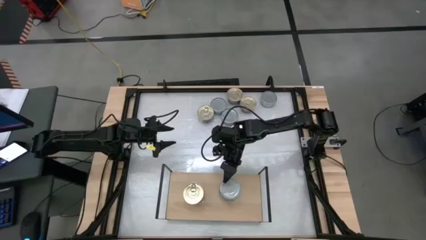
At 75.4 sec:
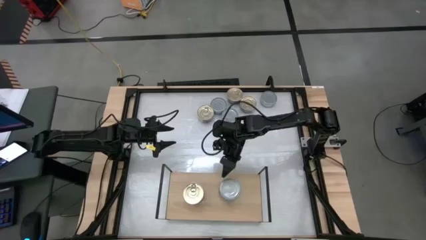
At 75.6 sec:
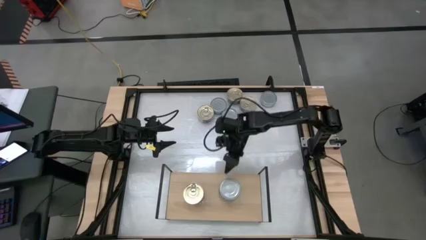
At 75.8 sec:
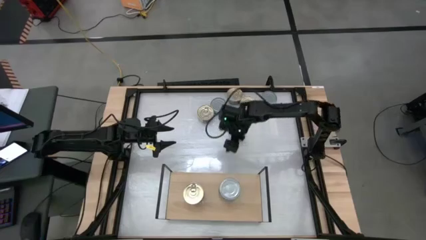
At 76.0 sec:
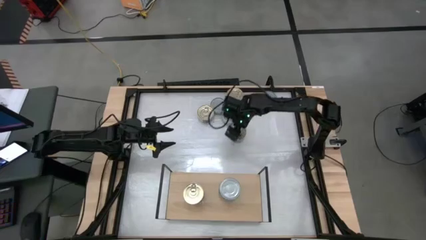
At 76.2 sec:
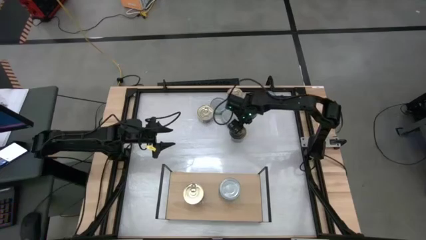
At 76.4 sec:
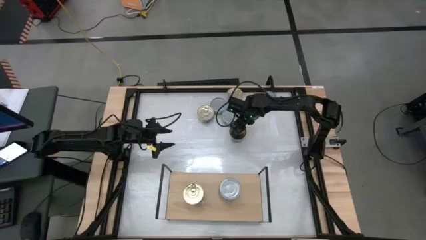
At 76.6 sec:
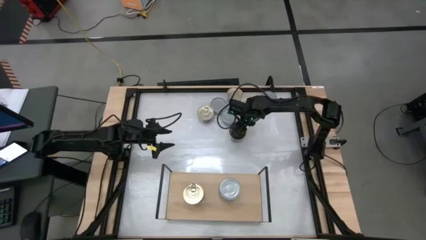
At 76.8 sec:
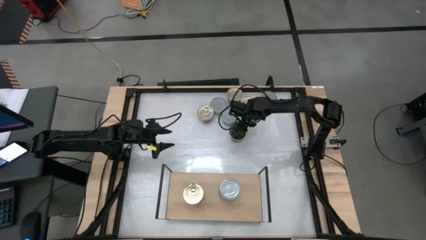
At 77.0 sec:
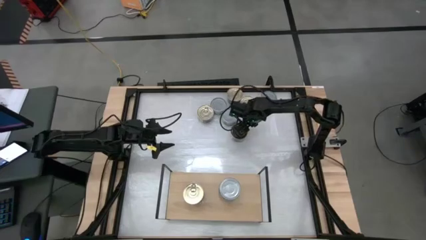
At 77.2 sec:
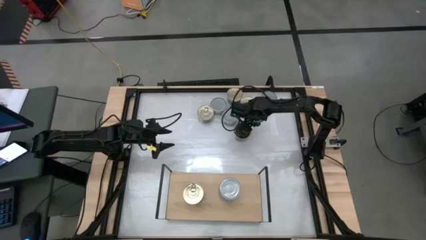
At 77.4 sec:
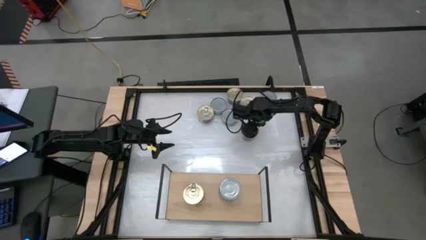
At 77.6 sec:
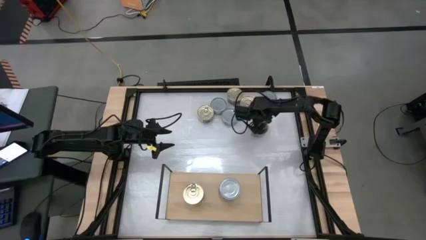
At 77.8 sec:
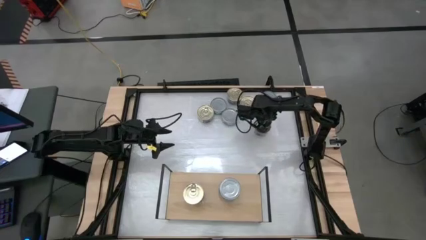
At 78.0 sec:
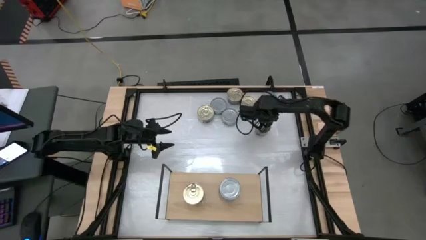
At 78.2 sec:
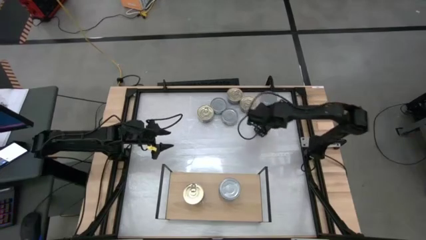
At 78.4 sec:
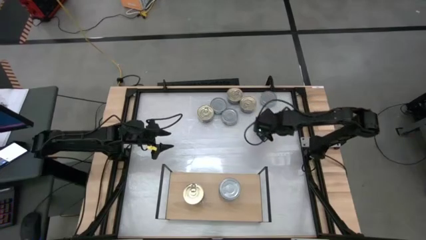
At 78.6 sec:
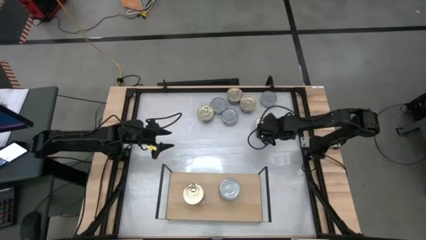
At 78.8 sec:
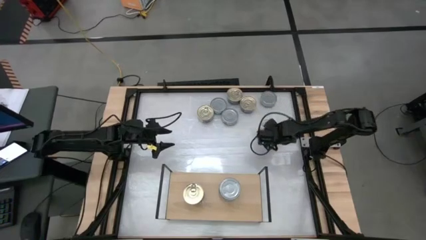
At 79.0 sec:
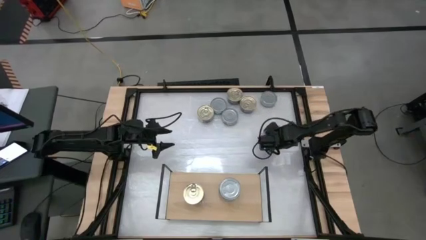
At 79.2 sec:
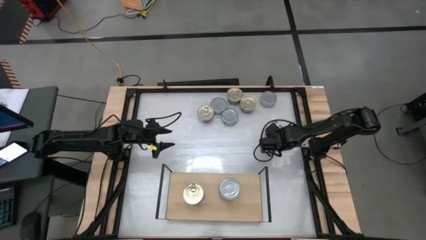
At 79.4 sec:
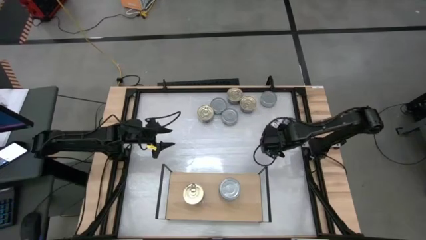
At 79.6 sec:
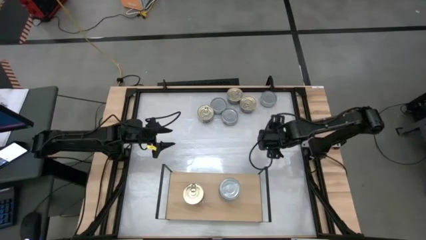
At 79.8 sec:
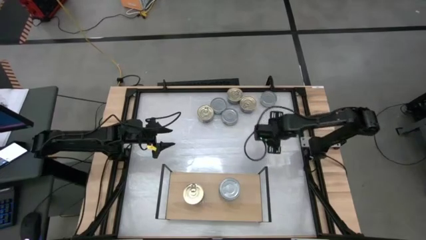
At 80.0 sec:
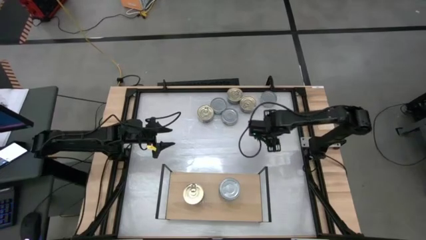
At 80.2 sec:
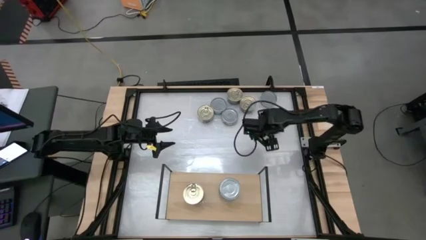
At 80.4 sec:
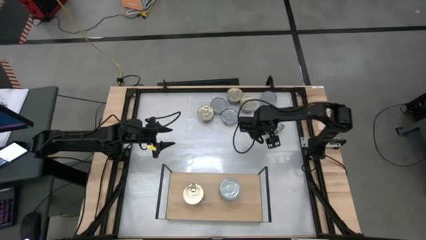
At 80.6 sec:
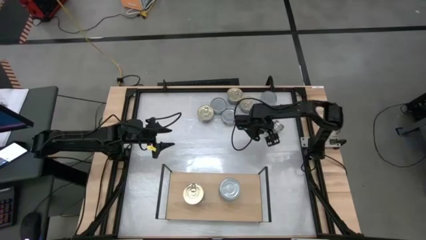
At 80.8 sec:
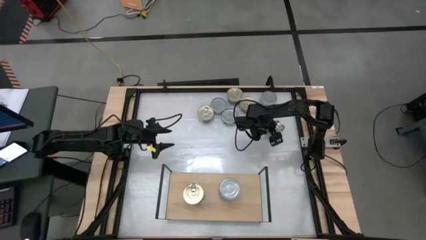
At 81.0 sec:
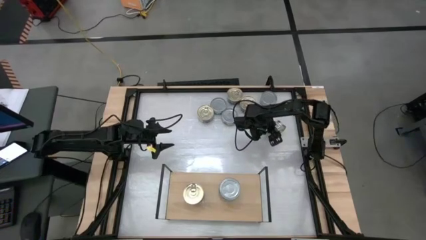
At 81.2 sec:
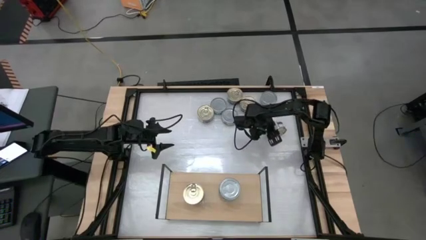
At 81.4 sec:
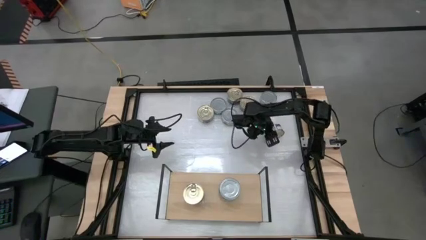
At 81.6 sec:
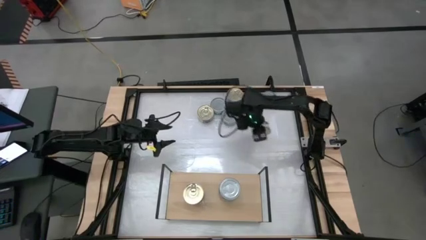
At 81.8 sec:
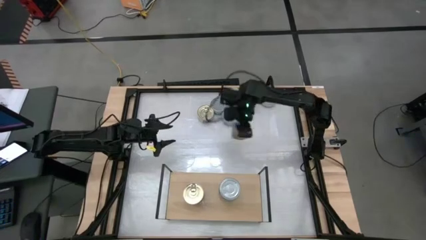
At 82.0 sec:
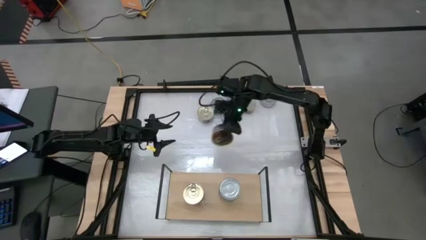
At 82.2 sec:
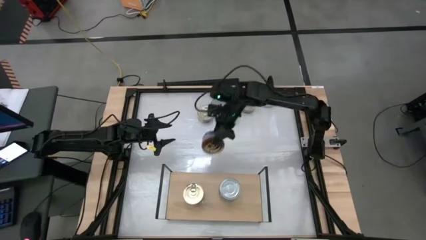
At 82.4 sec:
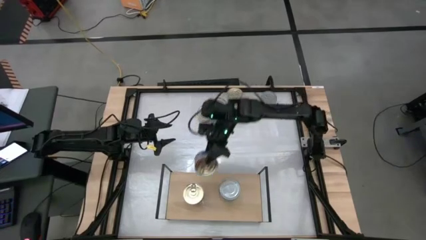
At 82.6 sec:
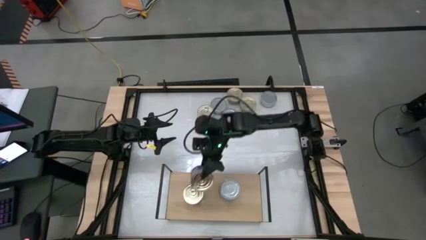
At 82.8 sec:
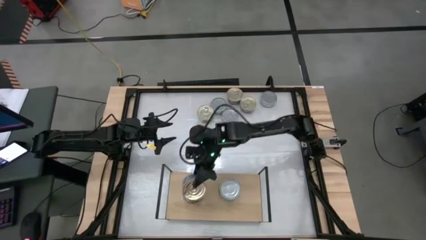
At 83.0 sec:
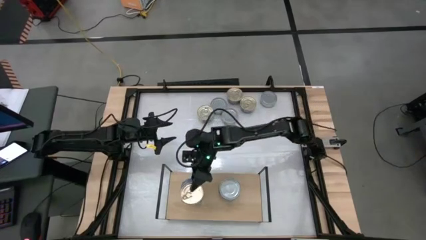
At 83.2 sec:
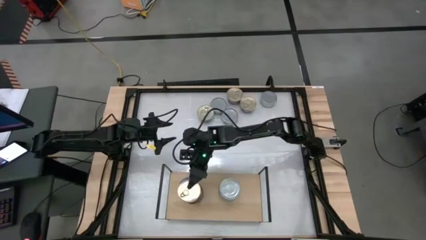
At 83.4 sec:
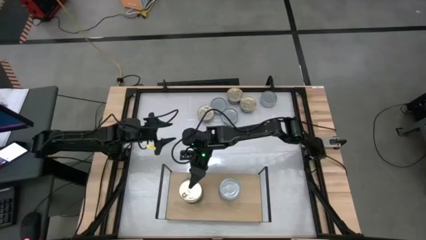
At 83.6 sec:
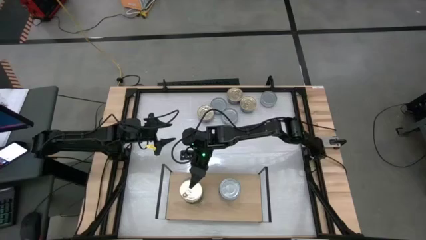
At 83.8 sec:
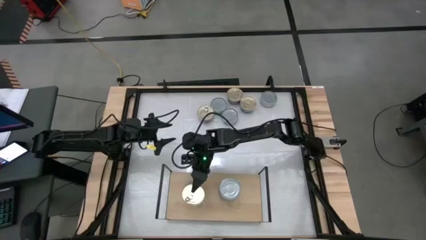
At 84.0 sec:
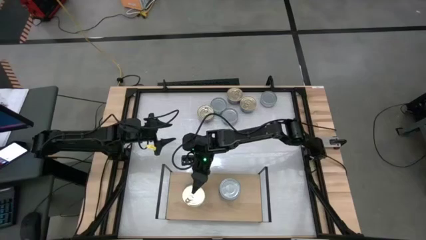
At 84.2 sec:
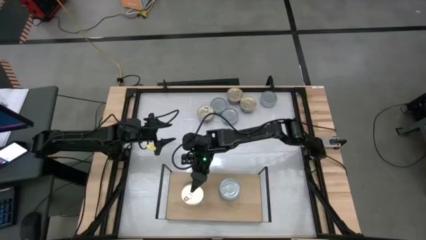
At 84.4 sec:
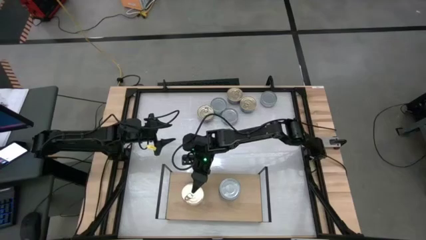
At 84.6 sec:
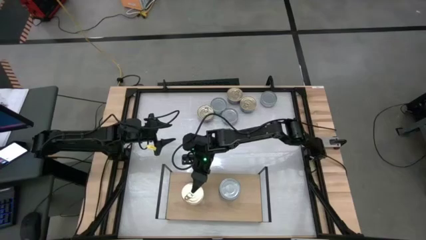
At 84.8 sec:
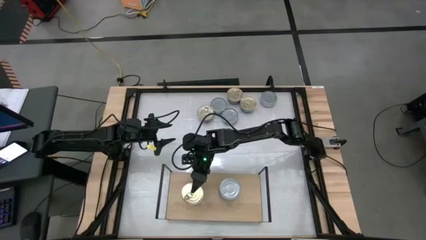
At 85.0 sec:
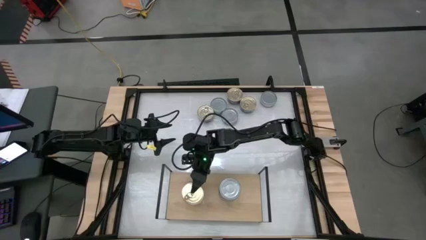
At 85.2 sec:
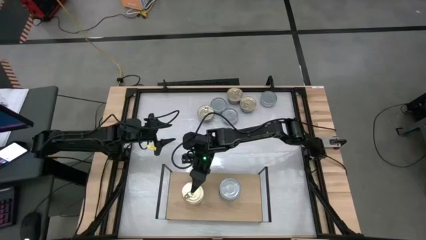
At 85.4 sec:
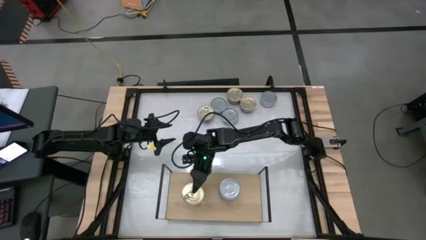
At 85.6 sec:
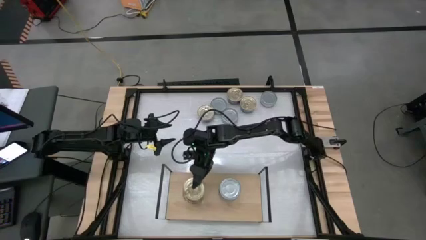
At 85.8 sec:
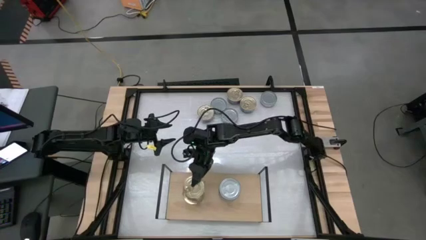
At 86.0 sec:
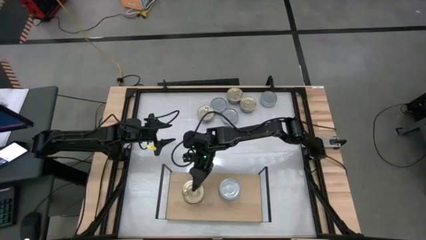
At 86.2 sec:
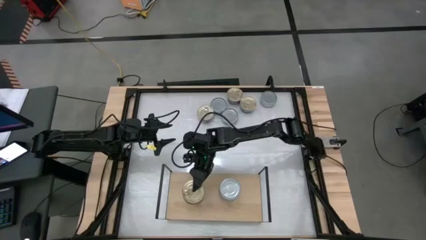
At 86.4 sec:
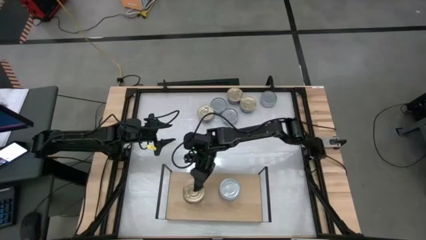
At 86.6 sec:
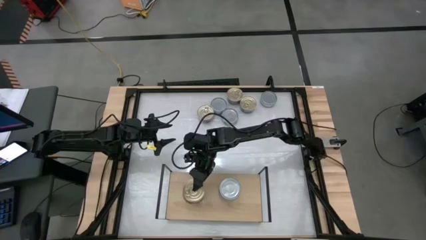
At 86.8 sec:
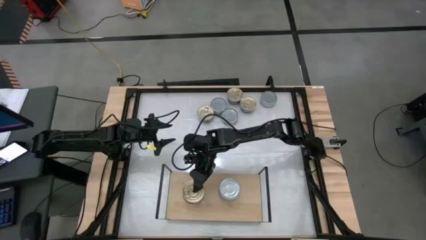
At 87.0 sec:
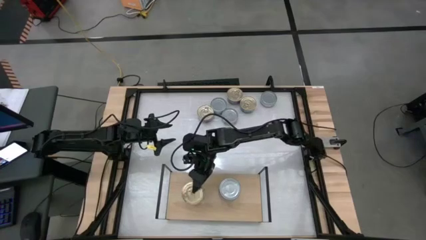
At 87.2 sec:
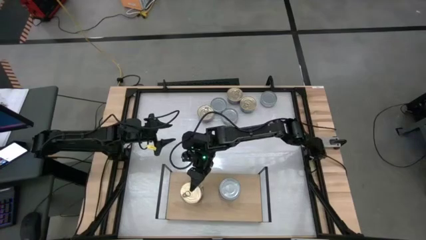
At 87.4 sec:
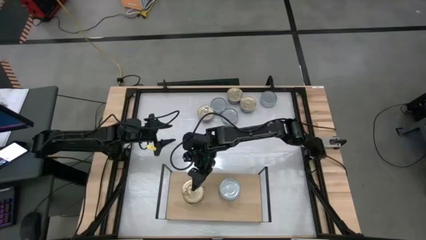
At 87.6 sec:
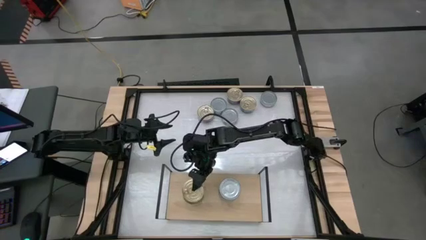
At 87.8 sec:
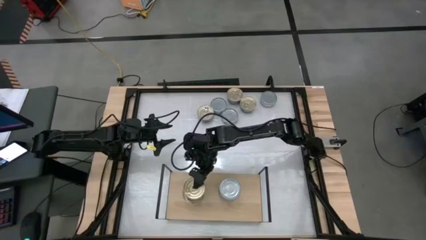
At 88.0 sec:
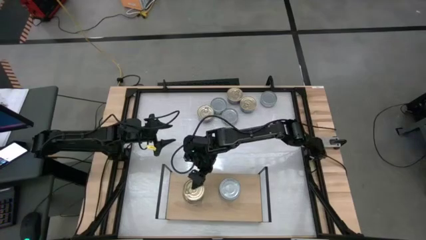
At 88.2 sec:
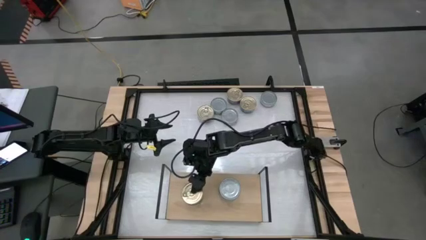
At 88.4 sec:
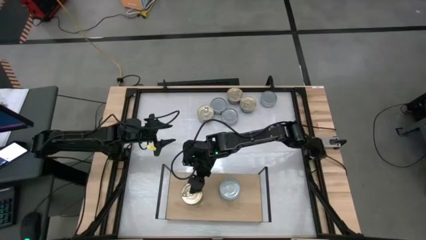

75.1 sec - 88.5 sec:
Task: Stack canned seafood by type on shelf
Stack the blue tuna can on top of the blue tuna can on the shelf
